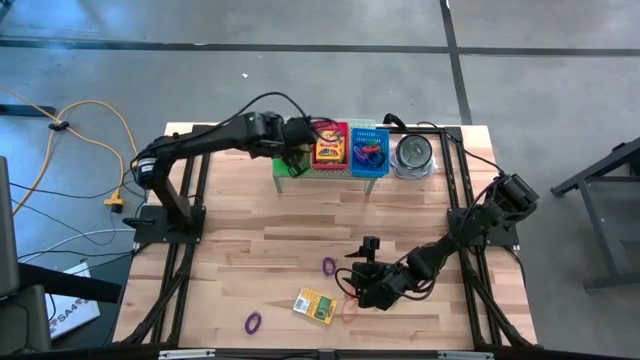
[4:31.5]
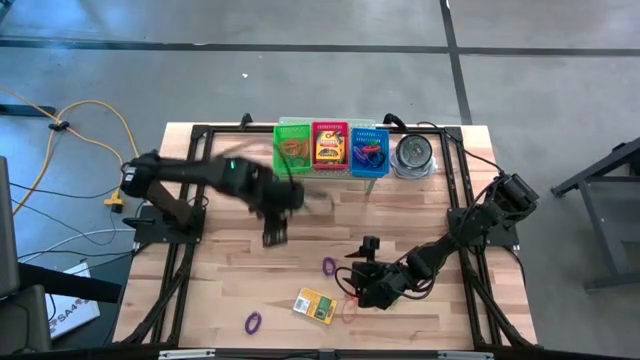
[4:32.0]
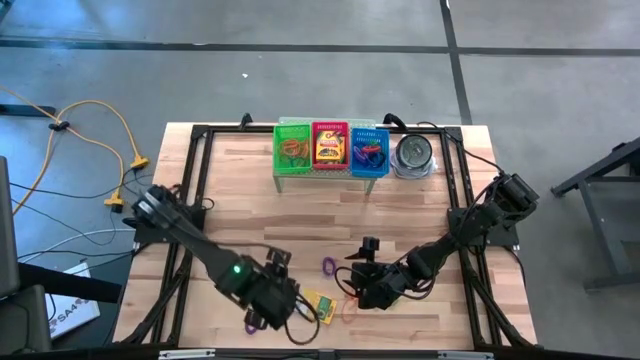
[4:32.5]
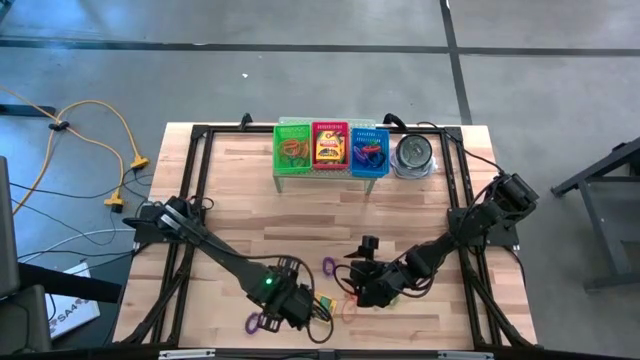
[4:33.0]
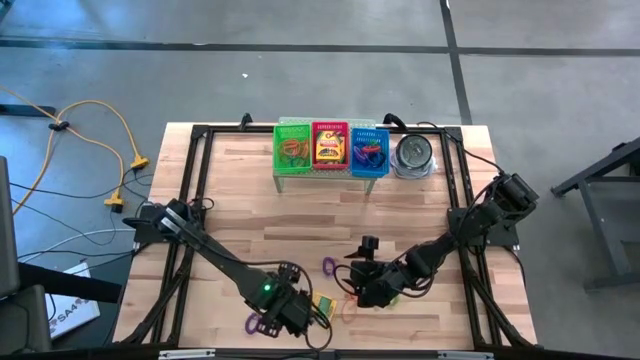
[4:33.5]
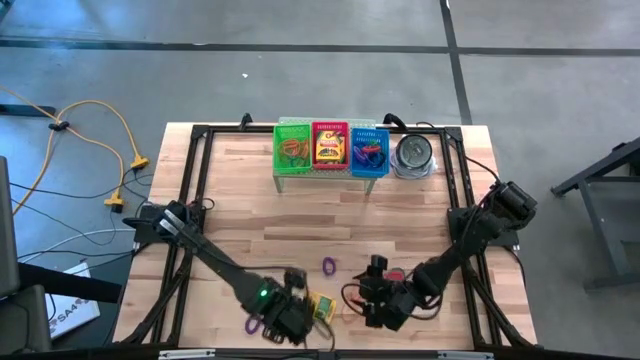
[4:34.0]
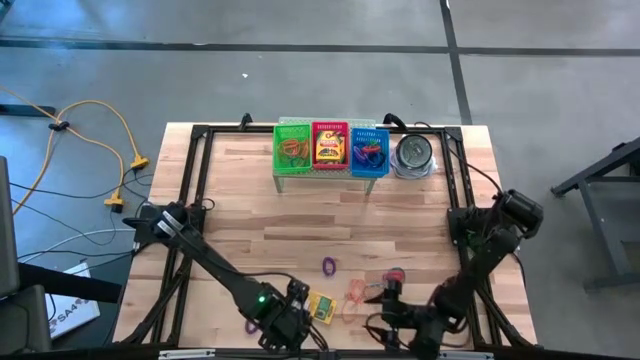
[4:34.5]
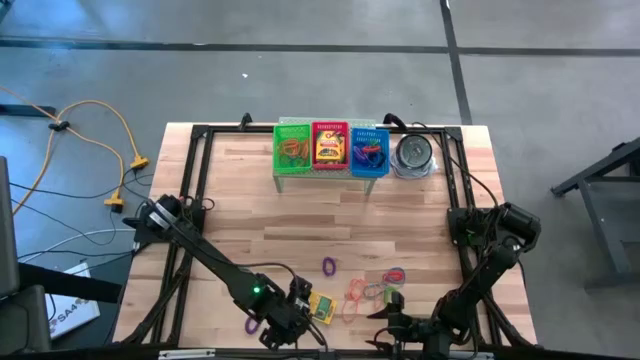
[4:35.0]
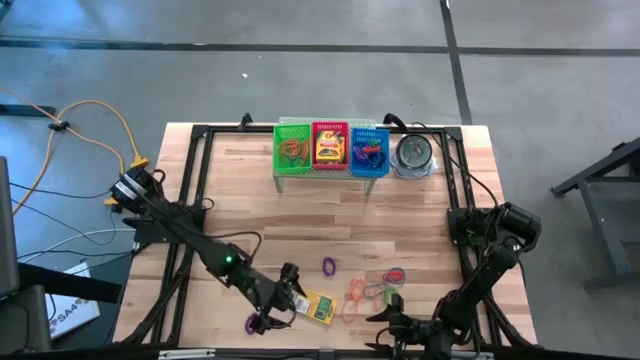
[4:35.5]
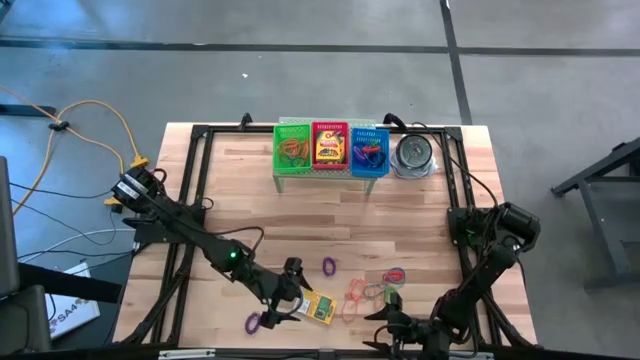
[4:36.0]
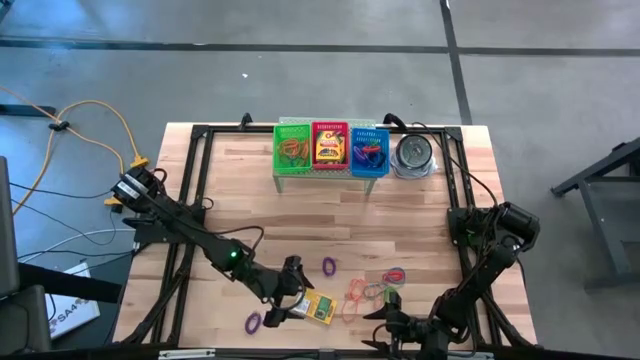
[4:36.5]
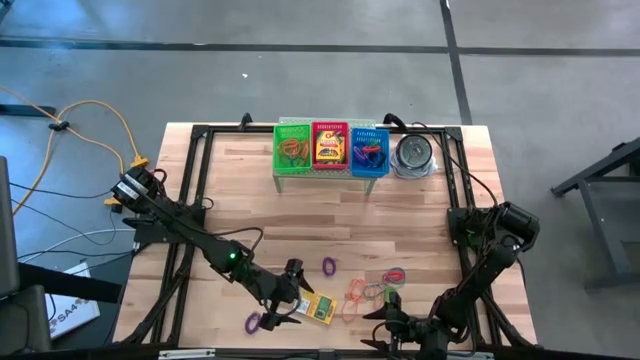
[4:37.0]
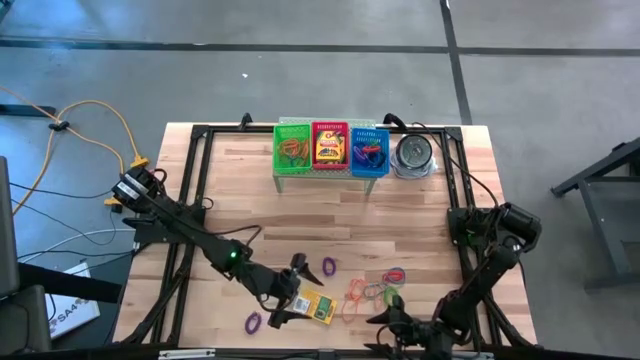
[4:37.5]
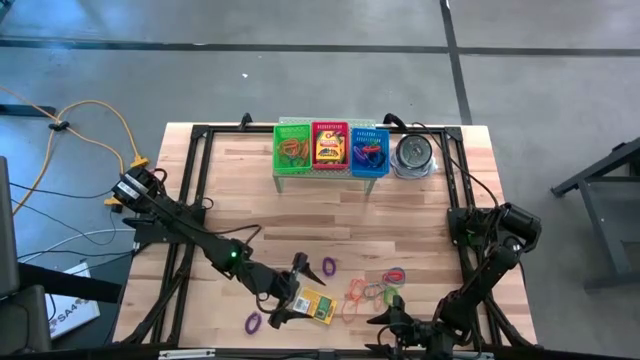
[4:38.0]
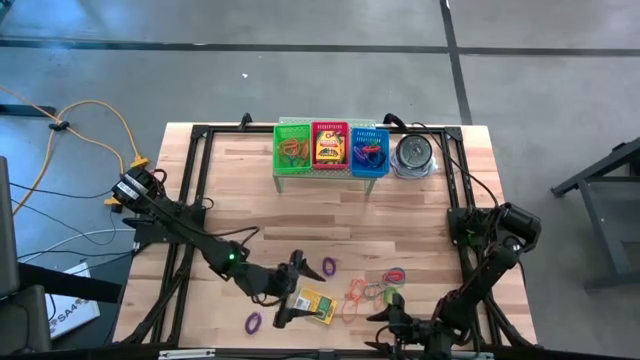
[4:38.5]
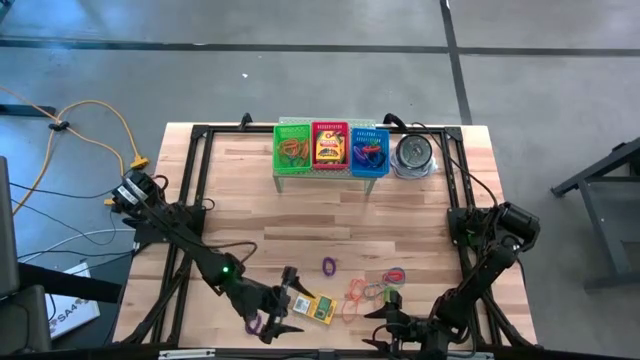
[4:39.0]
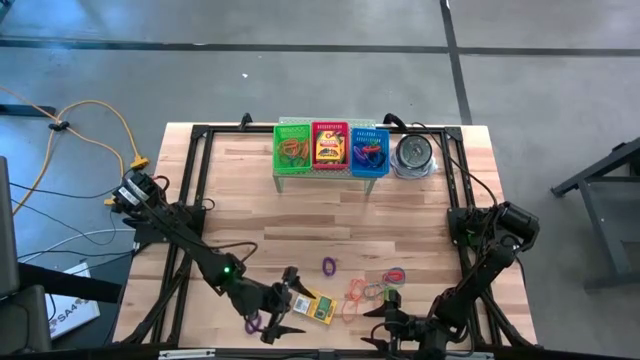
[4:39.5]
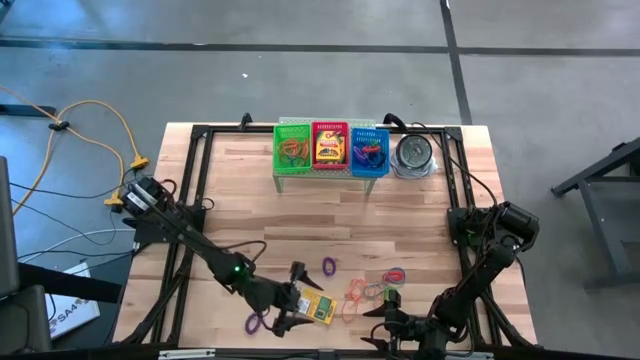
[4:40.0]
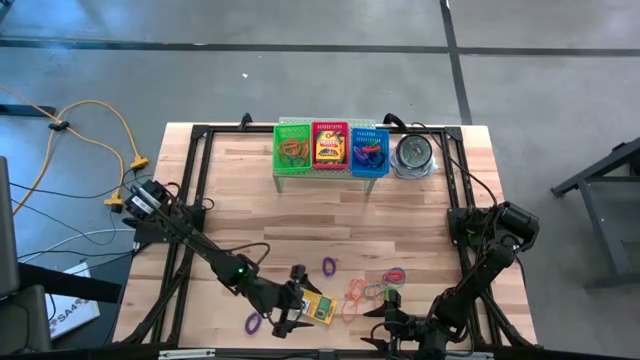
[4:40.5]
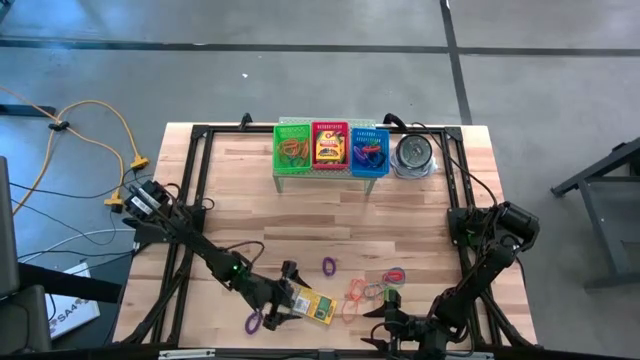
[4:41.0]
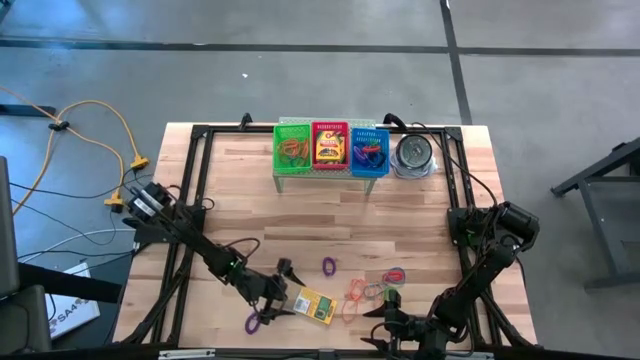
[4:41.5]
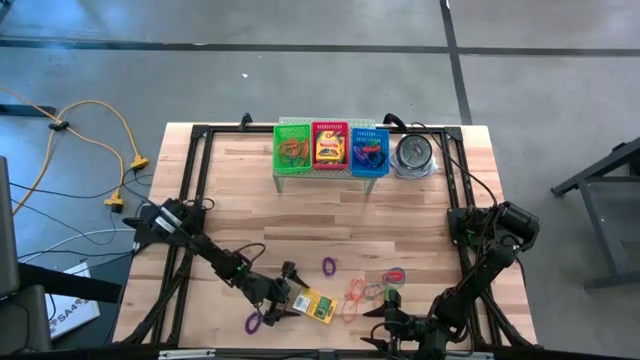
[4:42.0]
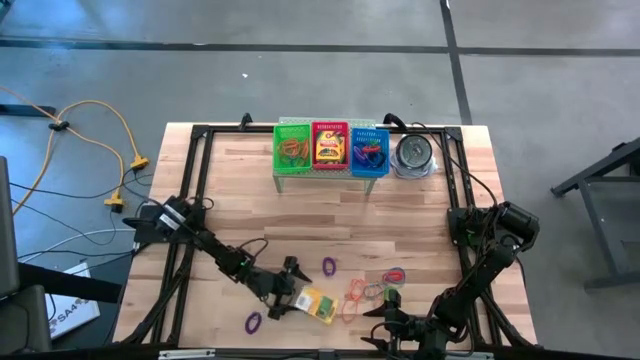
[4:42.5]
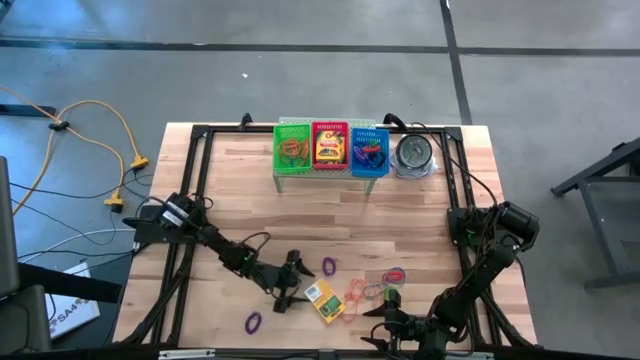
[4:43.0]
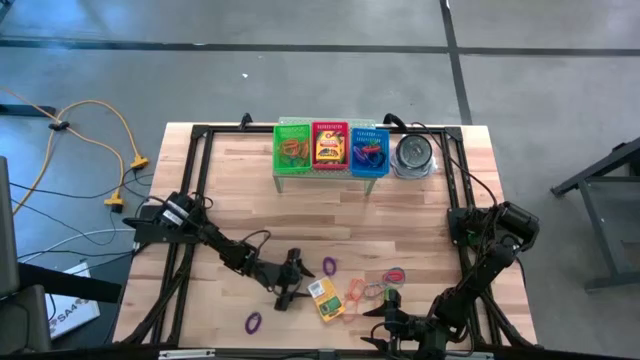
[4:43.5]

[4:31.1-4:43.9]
Task: Pick & Place Office Desk Supplies
Put the yellow crayon box into the red bin on the shelf
